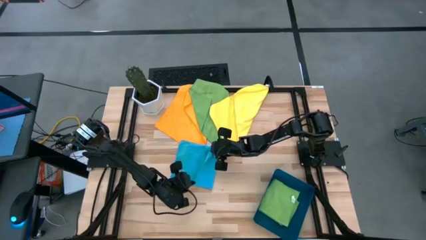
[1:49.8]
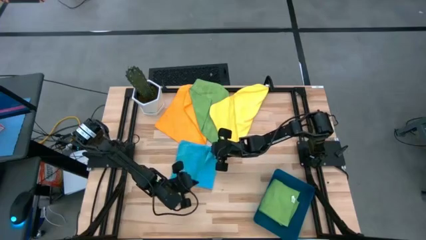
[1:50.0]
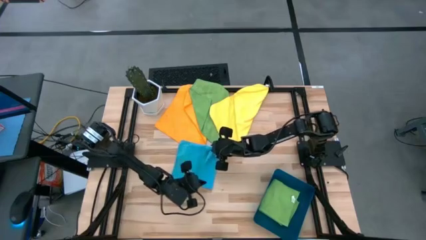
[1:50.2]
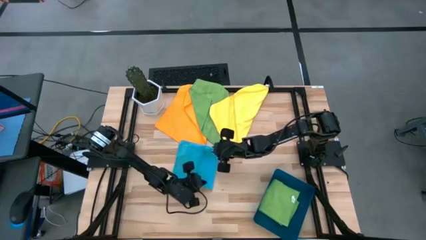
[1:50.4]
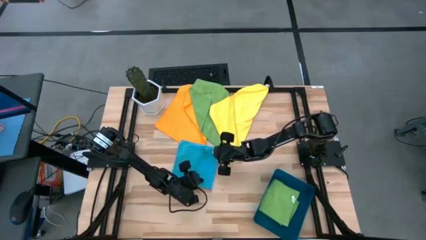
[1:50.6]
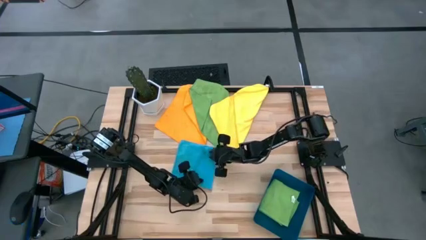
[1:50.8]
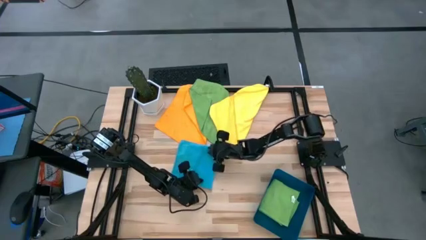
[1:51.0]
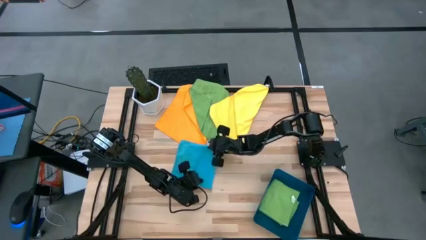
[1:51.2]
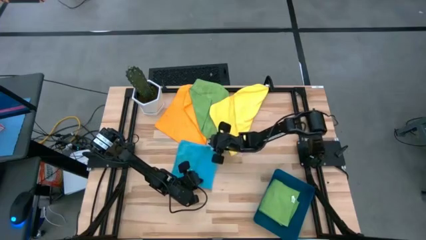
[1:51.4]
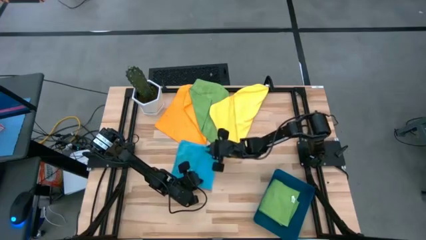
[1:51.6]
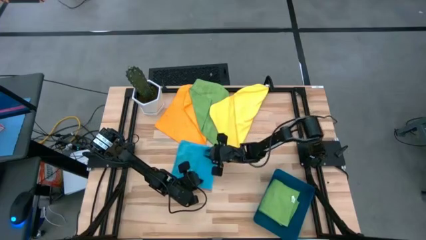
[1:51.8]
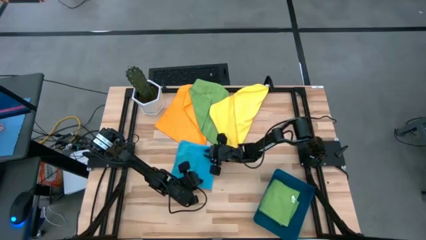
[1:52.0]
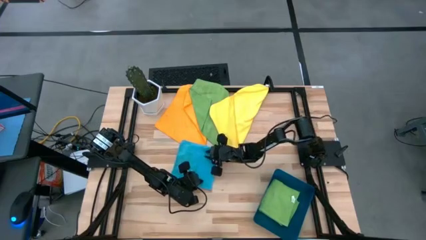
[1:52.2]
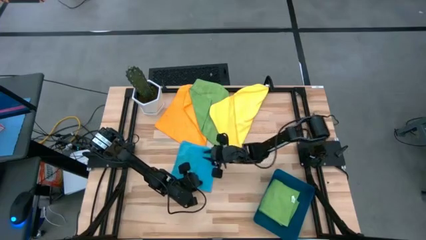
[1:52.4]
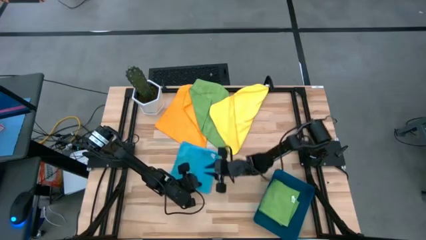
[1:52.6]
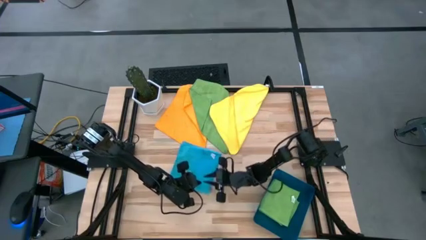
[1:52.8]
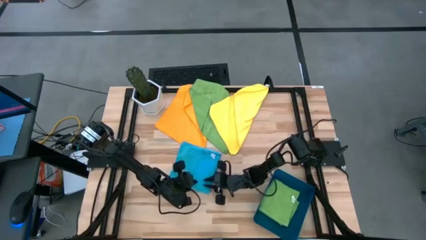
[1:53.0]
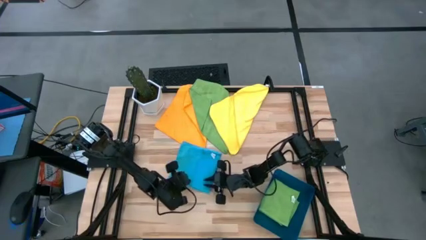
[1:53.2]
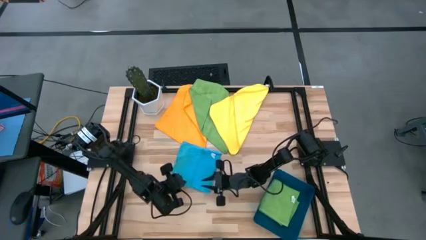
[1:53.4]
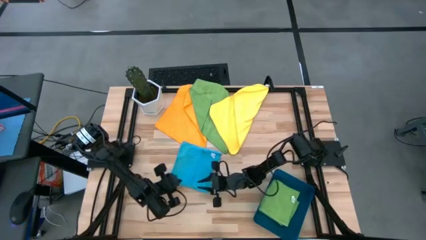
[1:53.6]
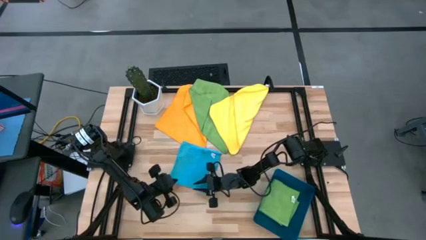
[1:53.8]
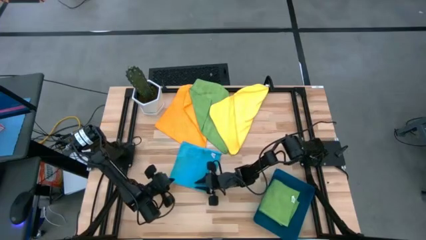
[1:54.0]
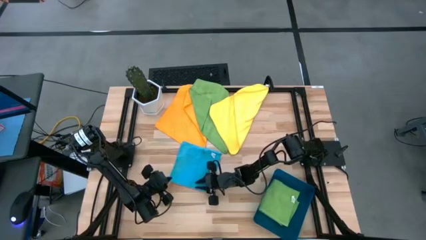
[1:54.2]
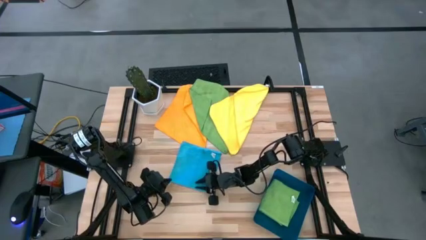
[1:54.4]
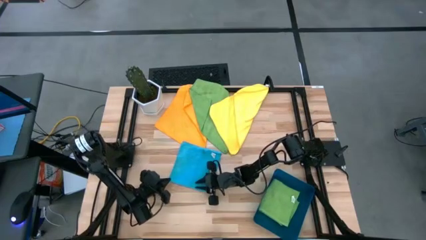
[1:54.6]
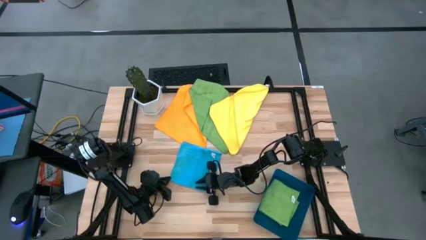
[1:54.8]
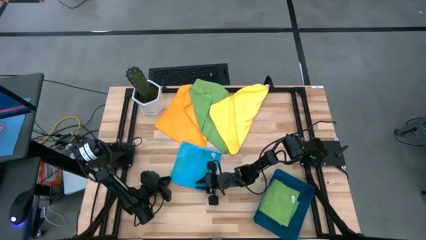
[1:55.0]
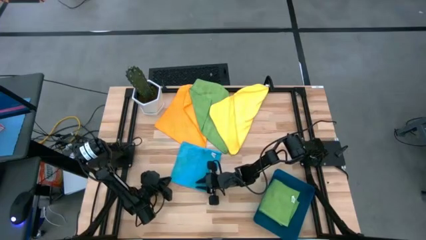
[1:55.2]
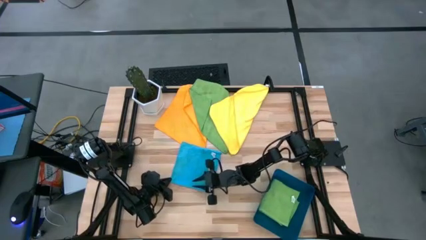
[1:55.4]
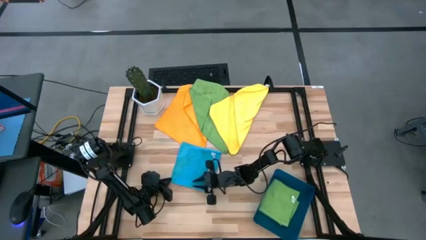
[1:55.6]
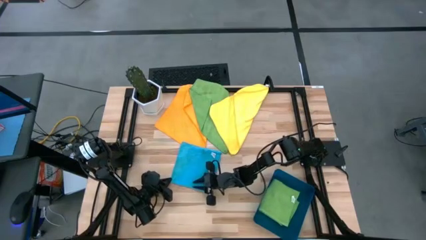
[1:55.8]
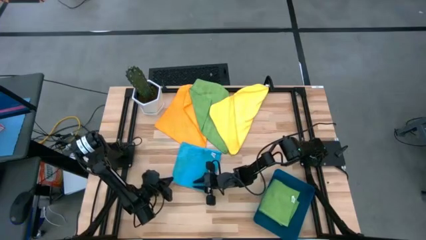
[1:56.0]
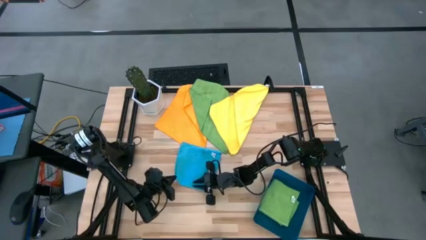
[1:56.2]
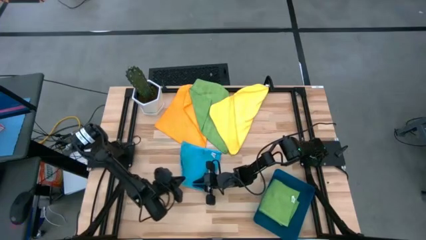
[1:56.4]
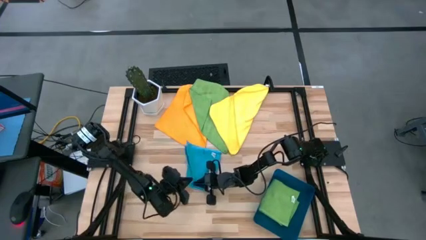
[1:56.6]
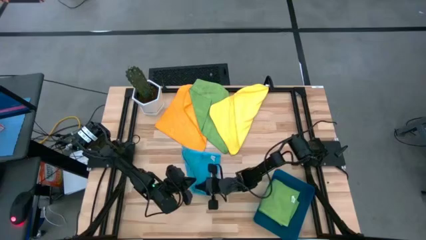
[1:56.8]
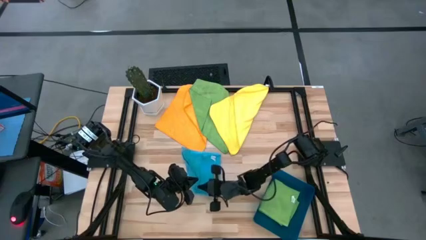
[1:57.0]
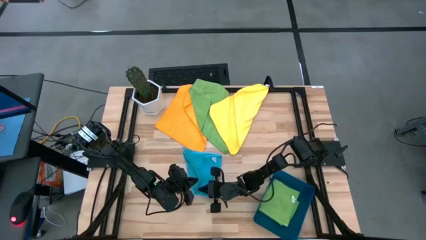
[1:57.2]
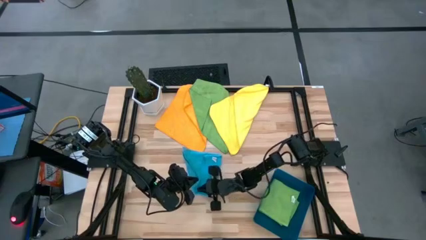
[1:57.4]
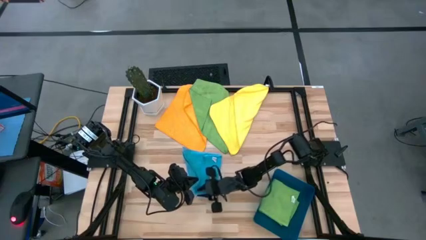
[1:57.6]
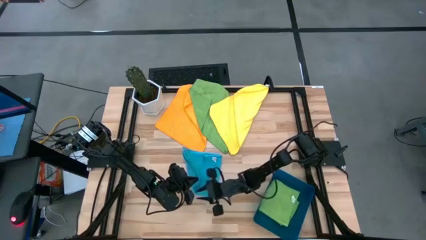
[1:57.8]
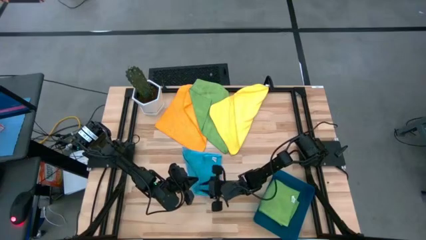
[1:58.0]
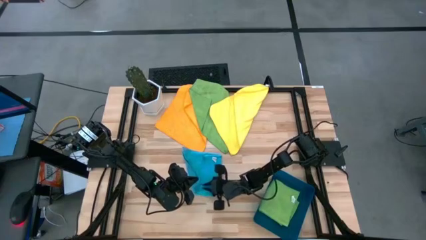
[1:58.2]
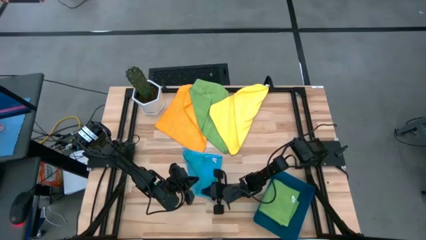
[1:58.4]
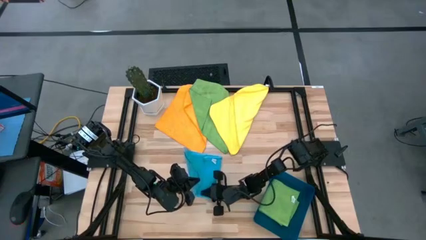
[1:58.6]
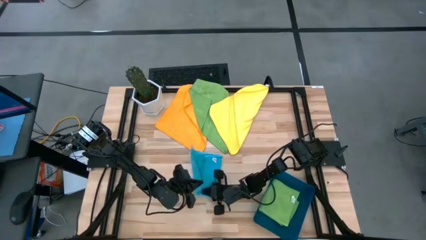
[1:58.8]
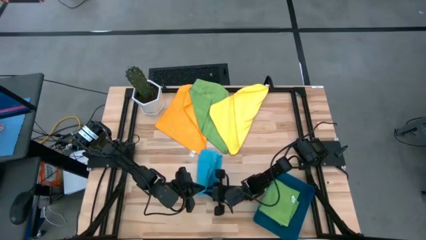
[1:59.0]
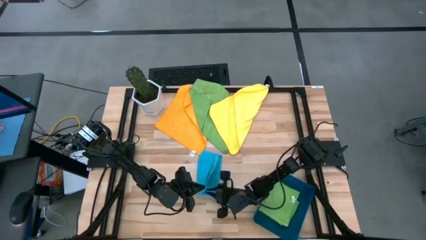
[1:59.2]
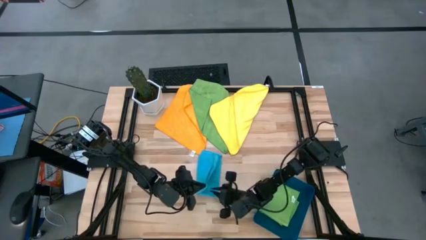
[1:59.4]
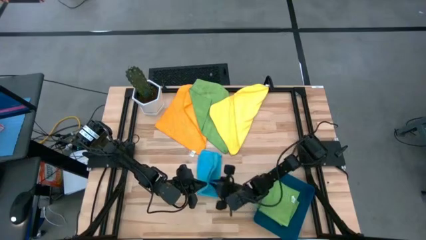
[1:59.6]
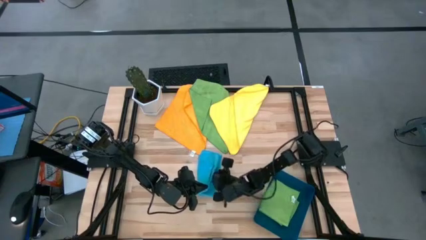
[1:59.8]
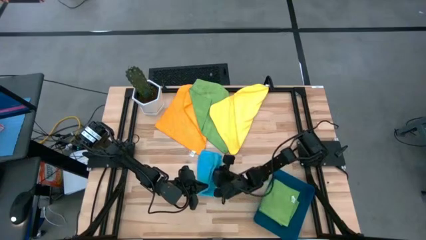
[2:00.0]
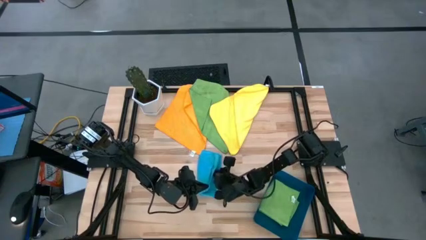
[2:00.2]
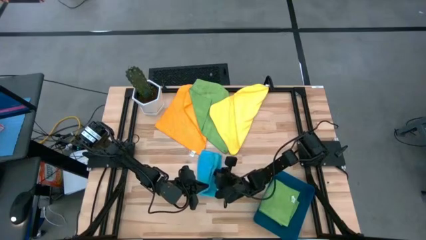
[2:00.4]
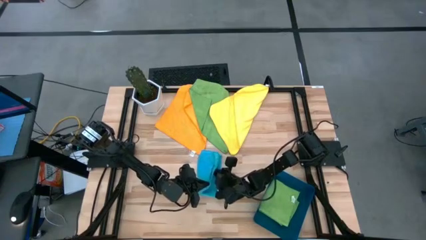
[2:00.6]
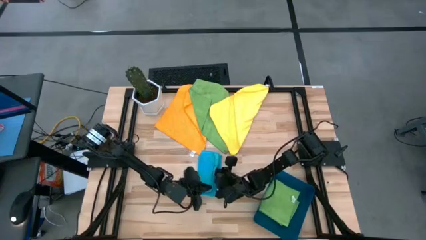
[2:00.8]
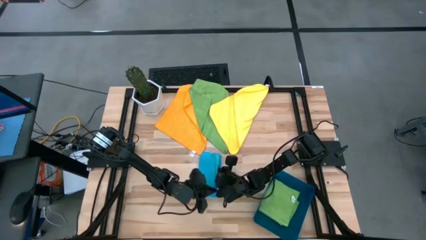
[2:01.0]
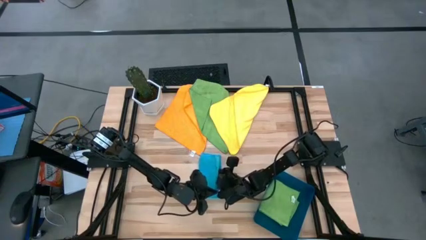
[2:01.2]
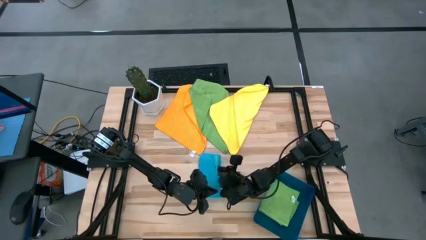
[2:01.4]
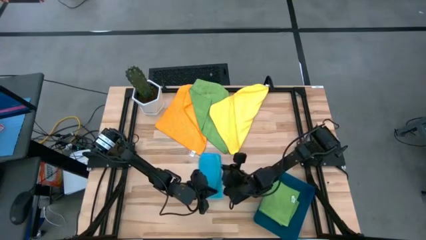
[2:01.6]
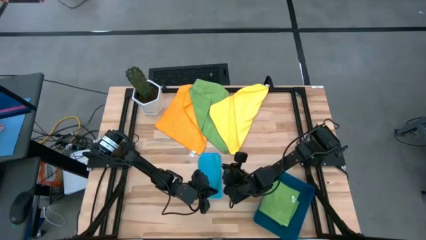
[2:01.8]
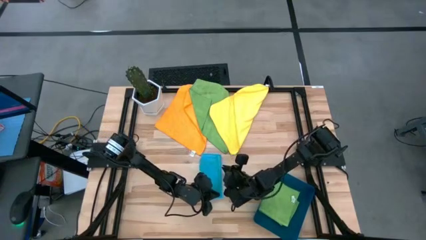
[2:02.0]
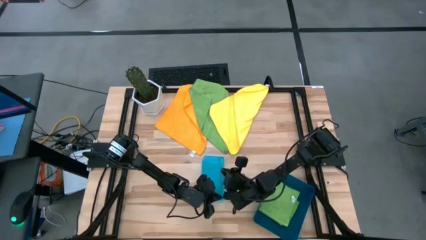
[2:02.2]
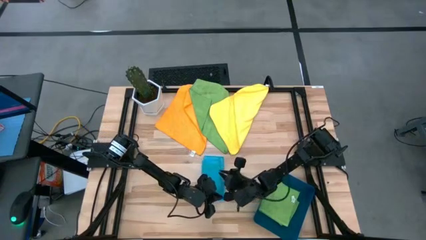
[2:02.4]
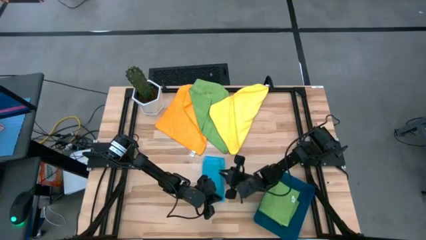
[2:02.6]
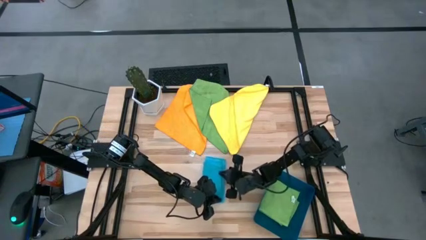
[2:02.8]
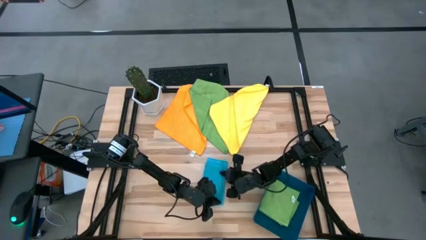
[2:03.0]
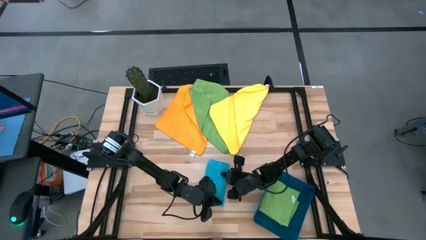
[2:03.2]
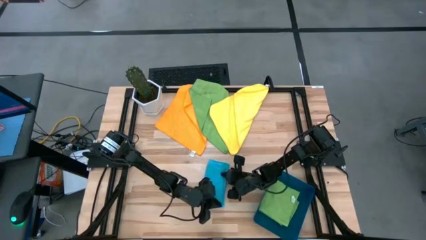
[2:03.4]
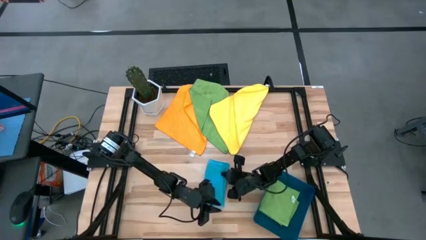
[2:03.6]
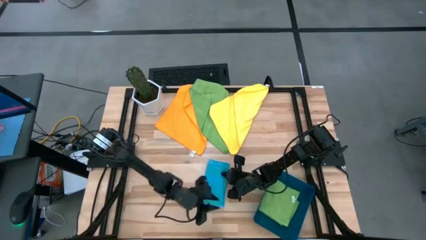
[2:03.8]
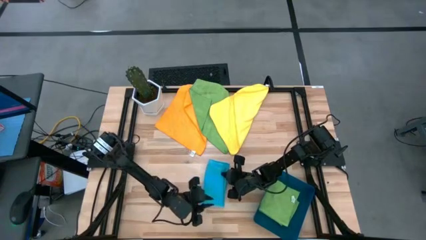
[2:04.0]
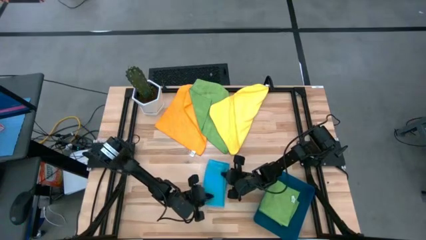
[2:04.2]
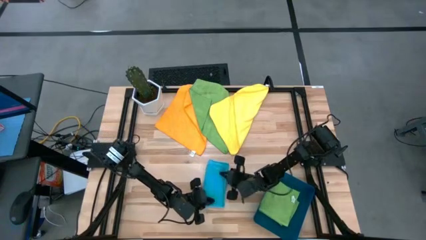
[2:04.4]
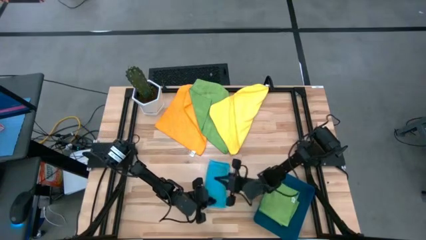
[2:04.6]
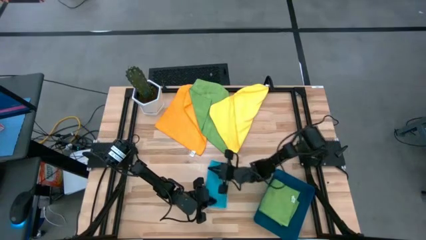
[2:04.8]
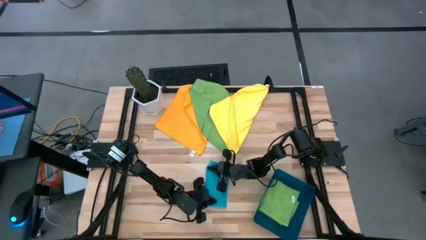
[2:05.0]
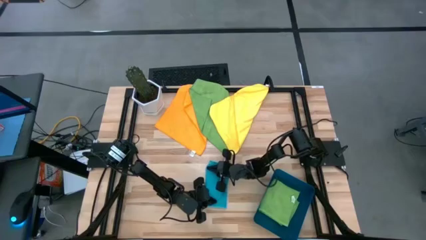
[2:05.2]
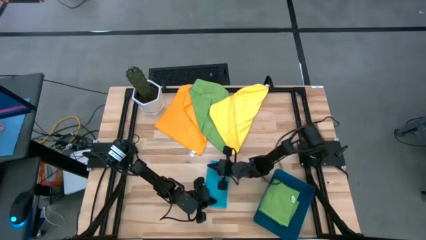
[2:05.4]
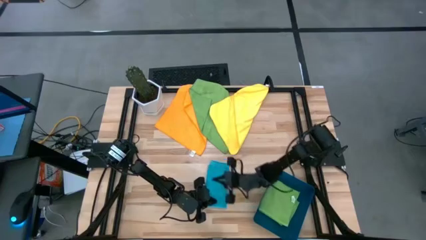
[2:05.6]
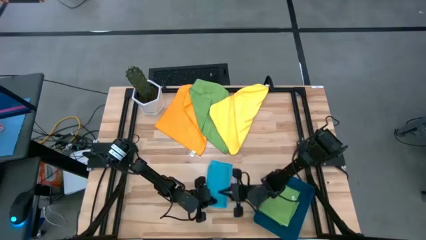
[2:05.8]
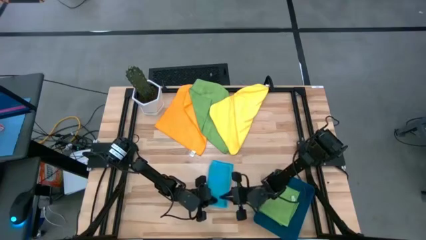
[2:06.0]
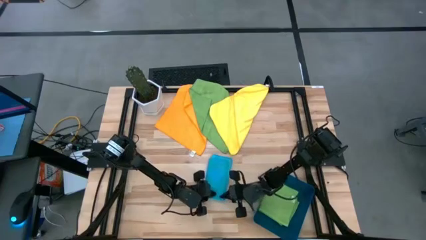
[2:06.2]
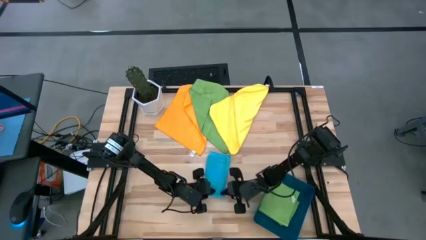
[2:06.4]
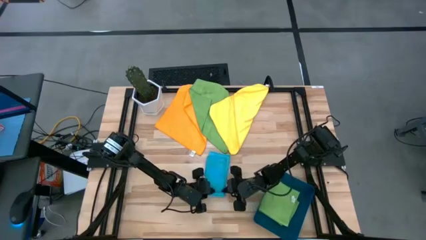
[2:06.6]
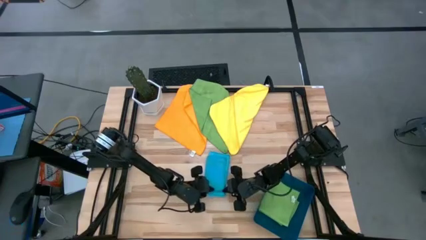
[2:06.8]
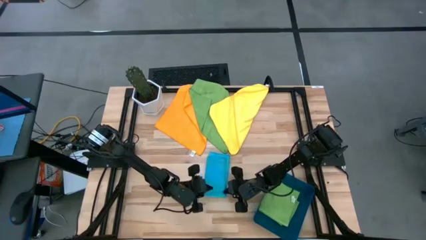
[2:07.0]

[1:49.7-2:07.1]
Task: Fold microfiber towels
Fold the blue microfiber towel
